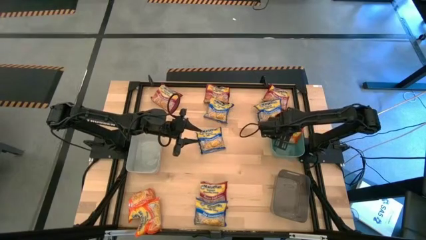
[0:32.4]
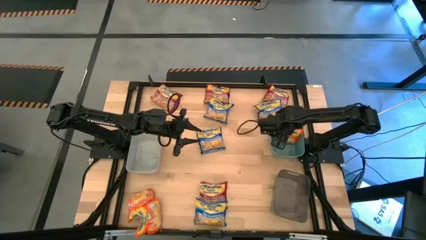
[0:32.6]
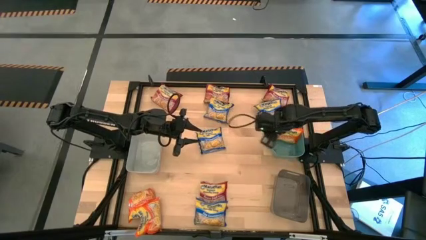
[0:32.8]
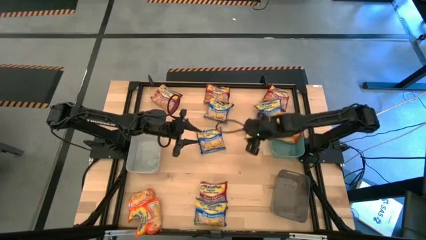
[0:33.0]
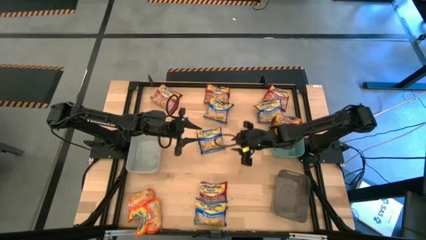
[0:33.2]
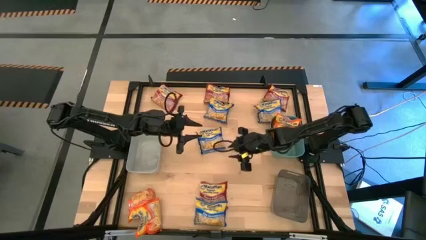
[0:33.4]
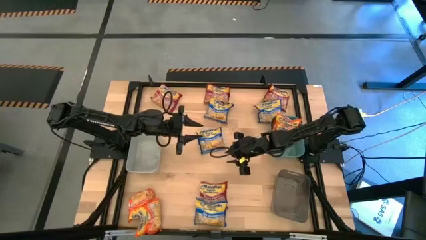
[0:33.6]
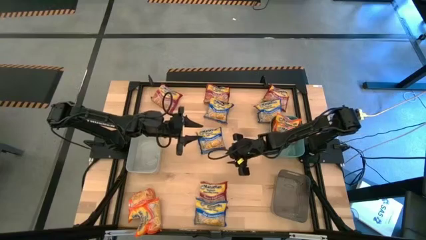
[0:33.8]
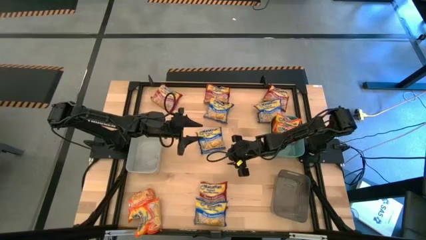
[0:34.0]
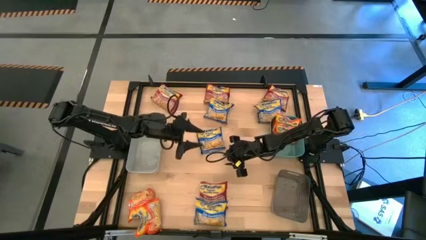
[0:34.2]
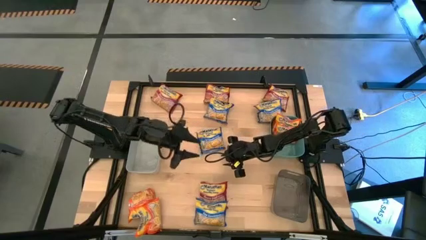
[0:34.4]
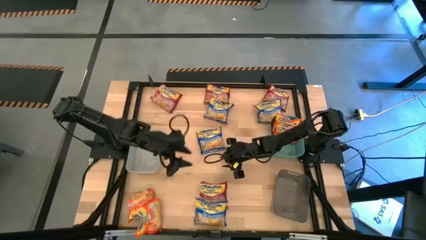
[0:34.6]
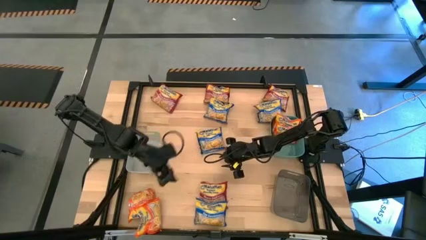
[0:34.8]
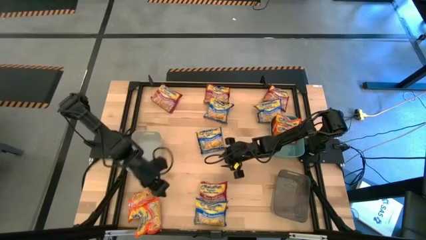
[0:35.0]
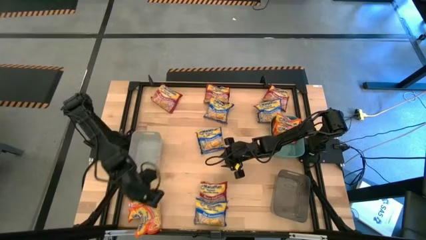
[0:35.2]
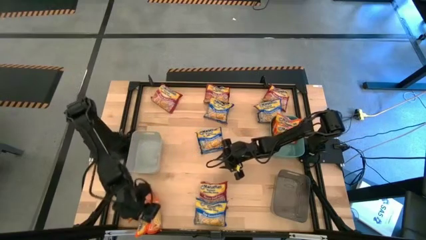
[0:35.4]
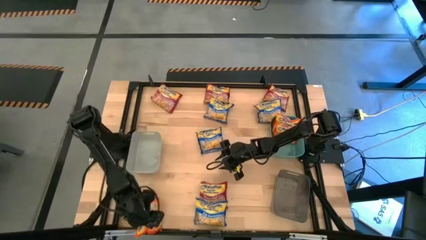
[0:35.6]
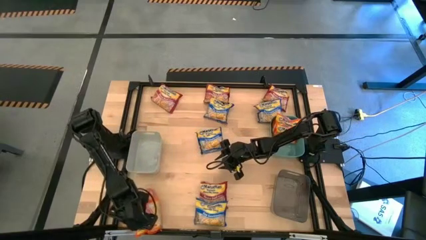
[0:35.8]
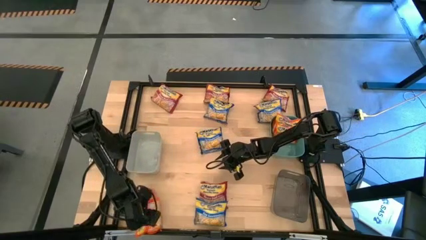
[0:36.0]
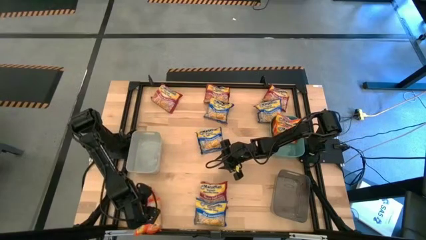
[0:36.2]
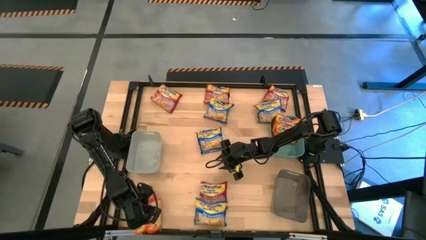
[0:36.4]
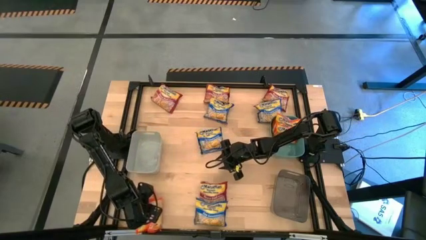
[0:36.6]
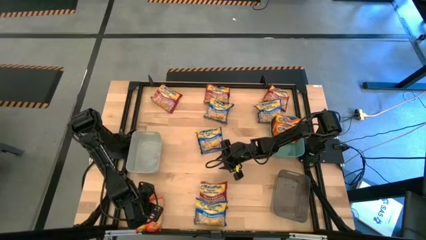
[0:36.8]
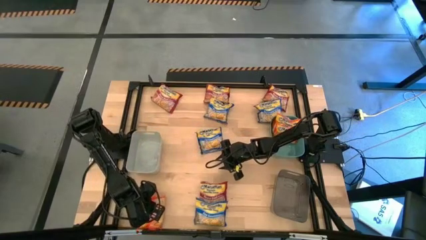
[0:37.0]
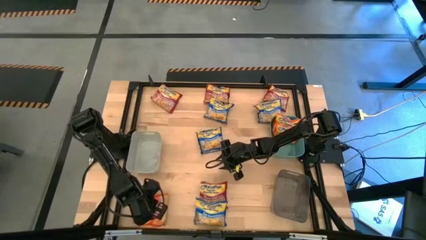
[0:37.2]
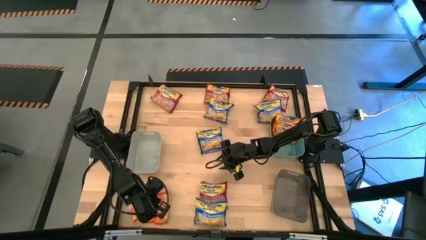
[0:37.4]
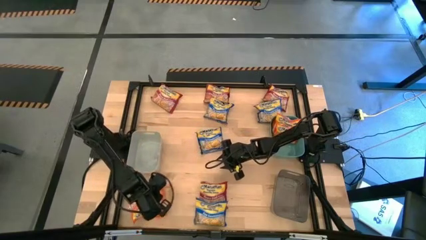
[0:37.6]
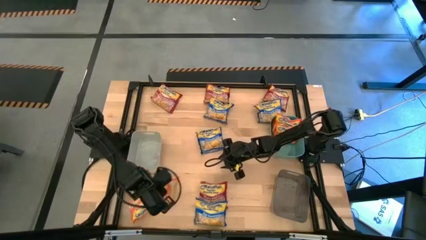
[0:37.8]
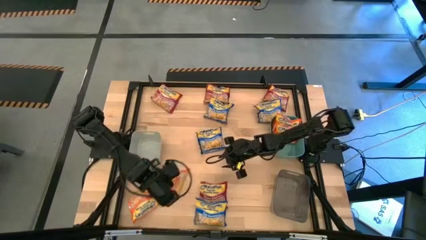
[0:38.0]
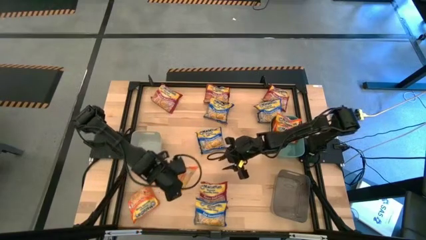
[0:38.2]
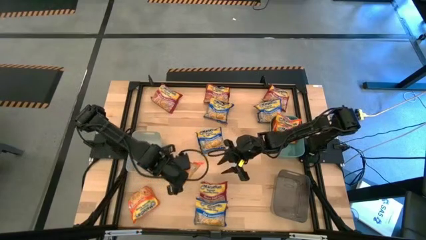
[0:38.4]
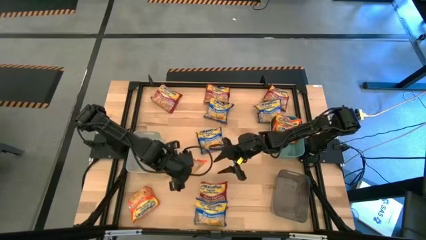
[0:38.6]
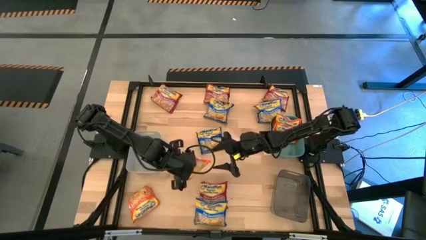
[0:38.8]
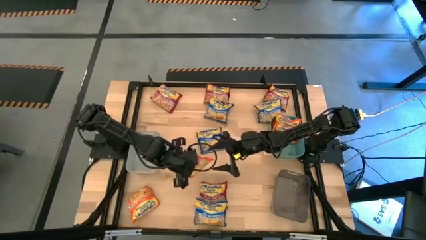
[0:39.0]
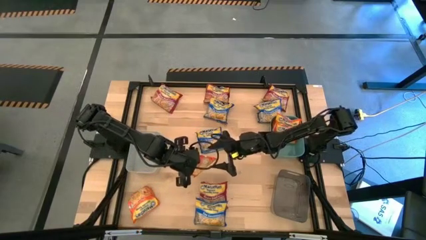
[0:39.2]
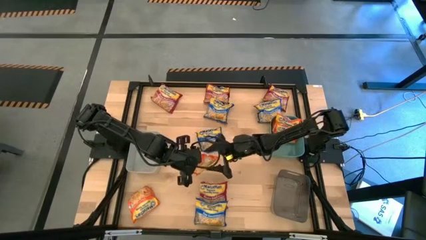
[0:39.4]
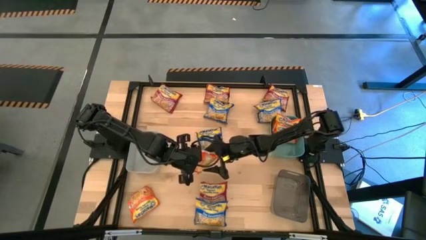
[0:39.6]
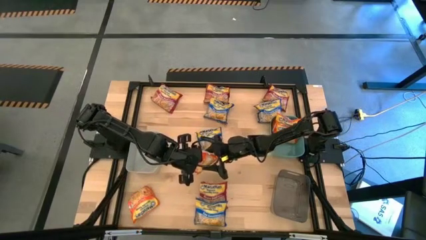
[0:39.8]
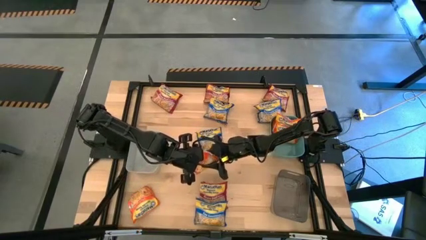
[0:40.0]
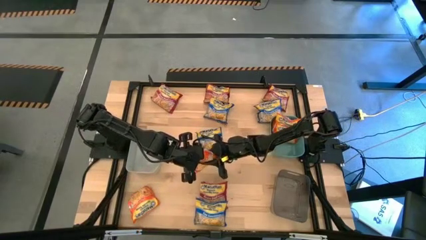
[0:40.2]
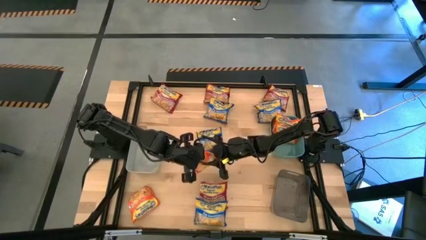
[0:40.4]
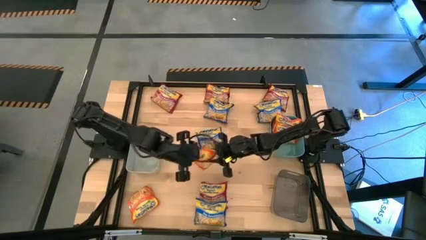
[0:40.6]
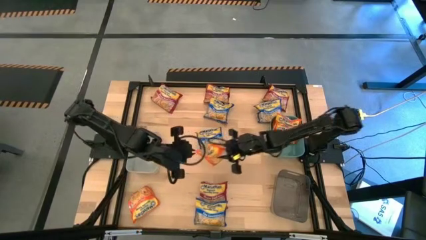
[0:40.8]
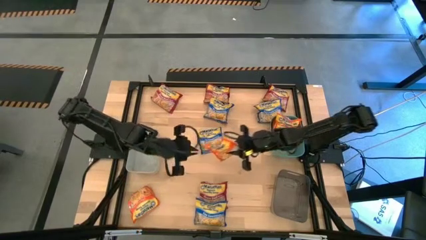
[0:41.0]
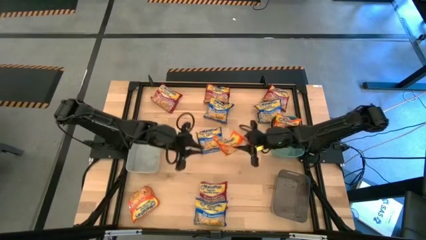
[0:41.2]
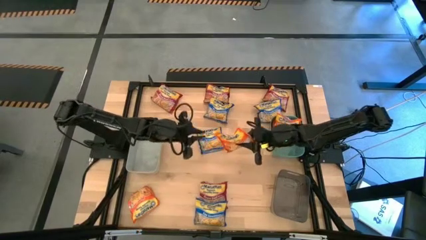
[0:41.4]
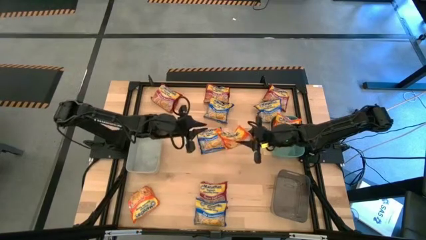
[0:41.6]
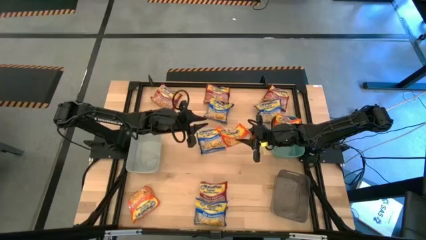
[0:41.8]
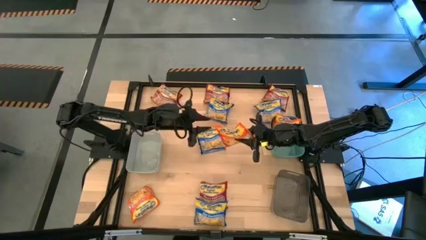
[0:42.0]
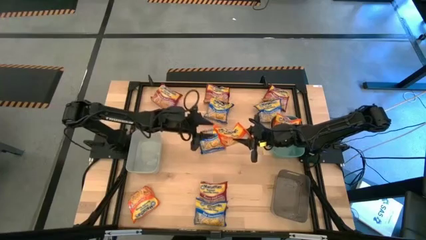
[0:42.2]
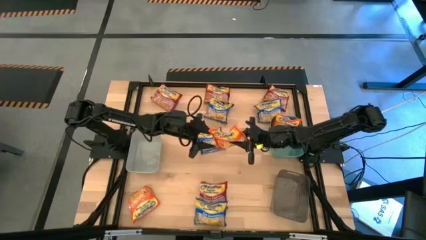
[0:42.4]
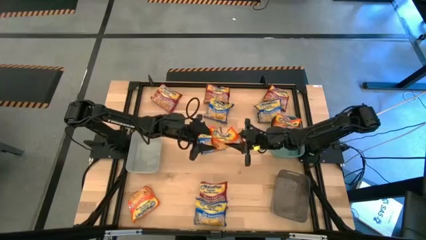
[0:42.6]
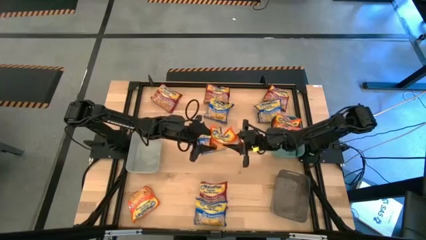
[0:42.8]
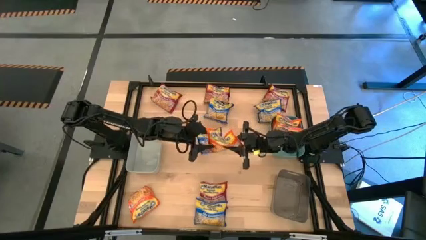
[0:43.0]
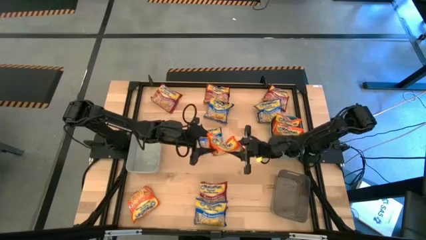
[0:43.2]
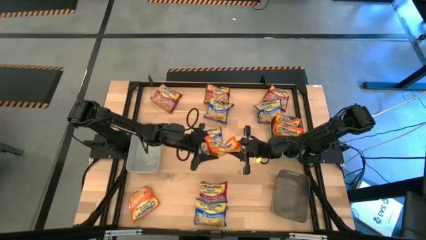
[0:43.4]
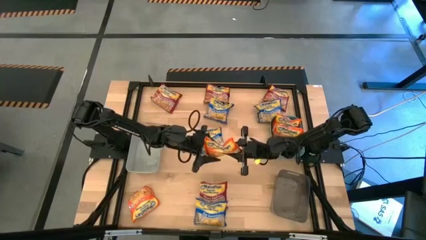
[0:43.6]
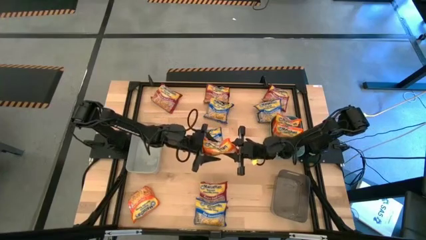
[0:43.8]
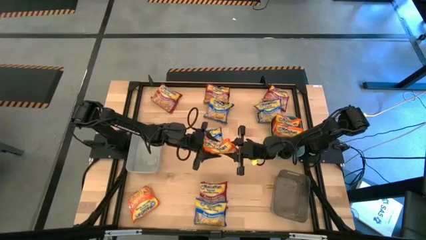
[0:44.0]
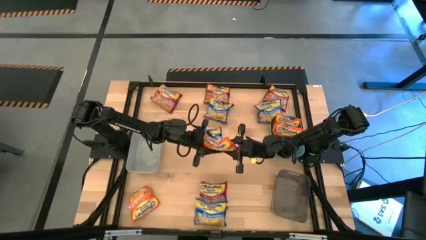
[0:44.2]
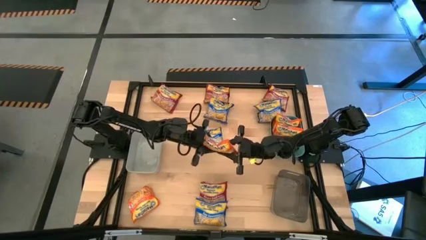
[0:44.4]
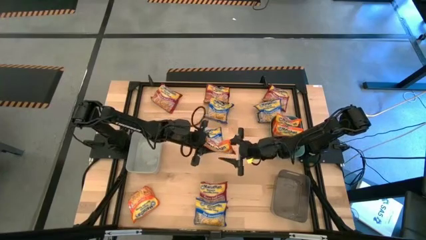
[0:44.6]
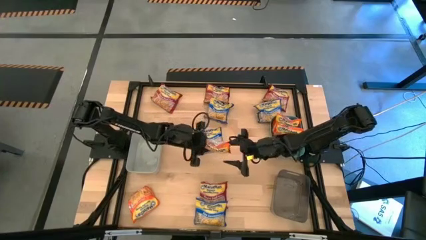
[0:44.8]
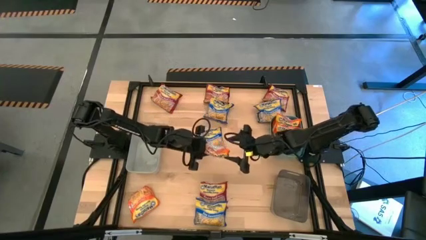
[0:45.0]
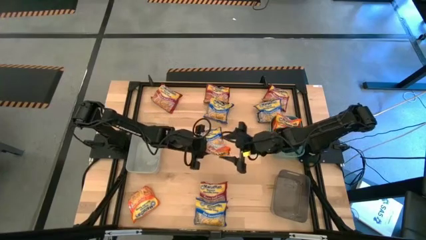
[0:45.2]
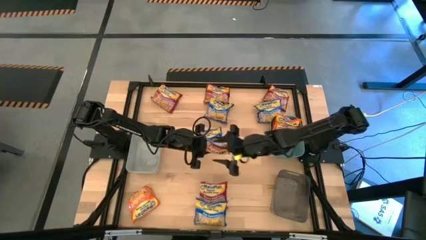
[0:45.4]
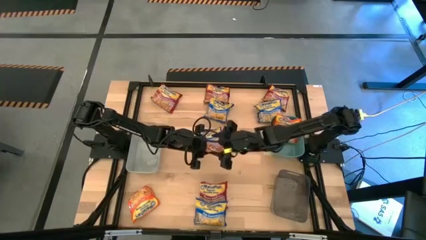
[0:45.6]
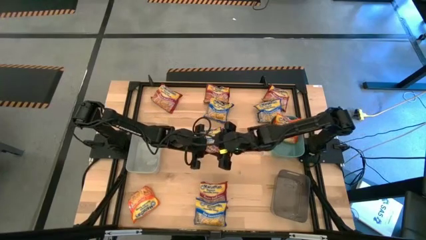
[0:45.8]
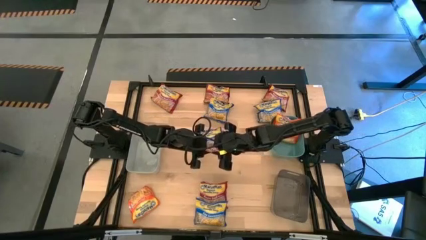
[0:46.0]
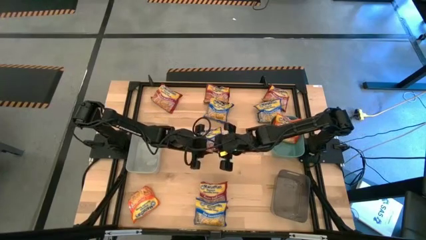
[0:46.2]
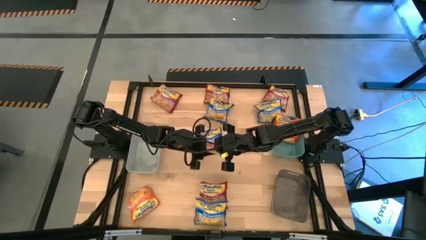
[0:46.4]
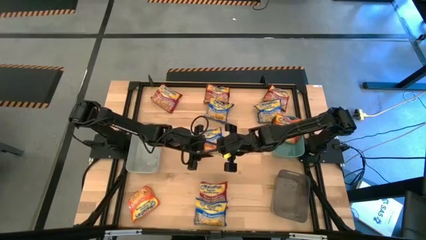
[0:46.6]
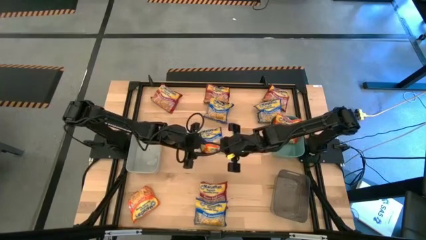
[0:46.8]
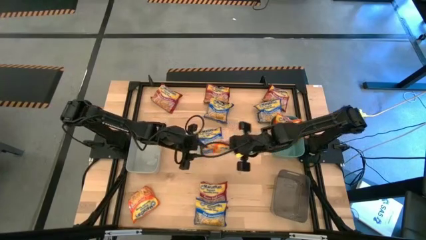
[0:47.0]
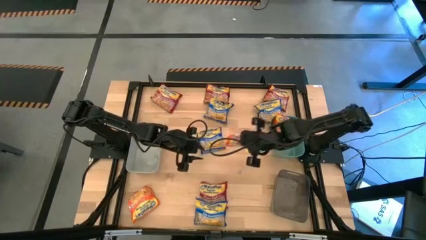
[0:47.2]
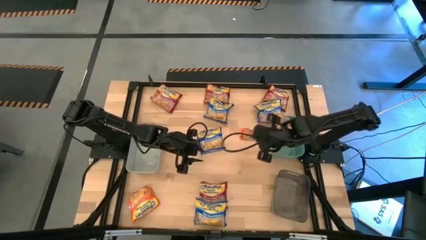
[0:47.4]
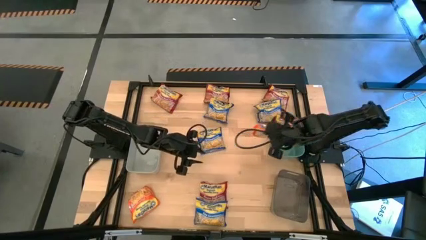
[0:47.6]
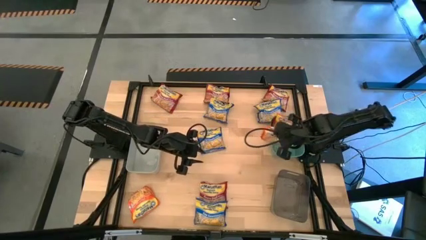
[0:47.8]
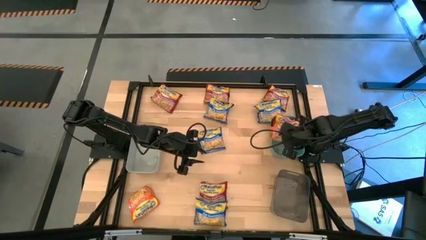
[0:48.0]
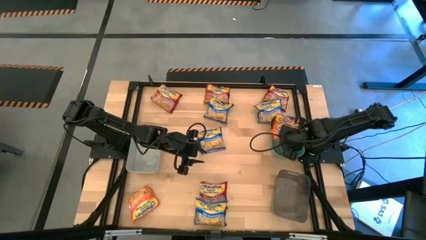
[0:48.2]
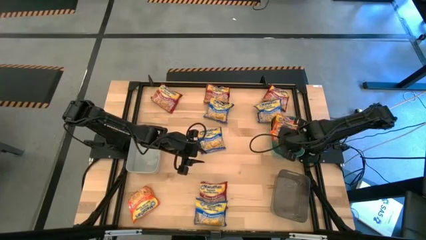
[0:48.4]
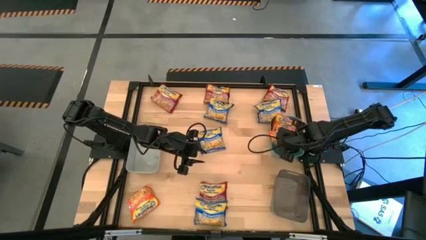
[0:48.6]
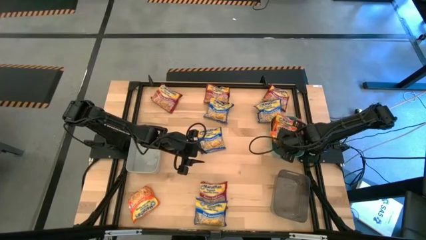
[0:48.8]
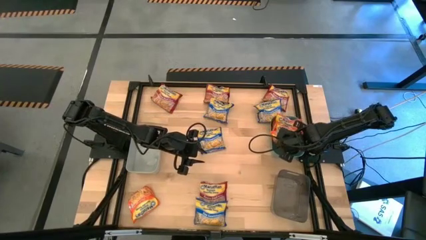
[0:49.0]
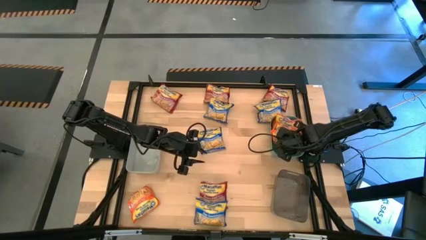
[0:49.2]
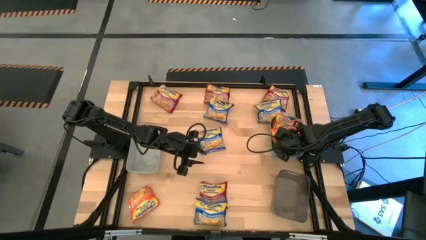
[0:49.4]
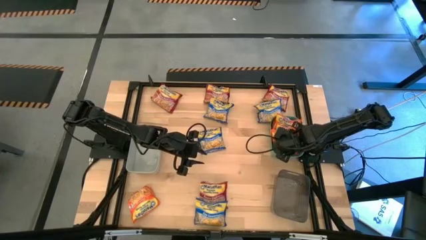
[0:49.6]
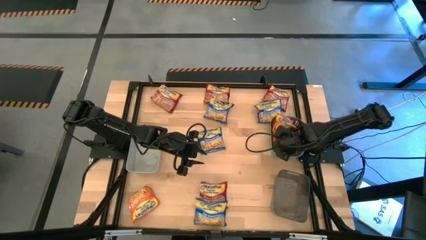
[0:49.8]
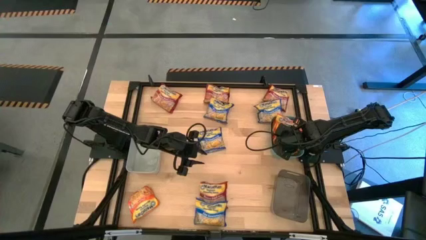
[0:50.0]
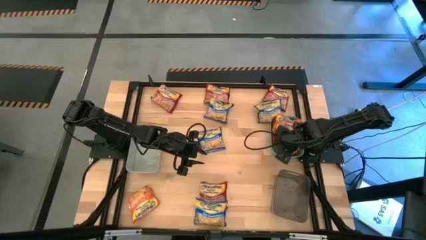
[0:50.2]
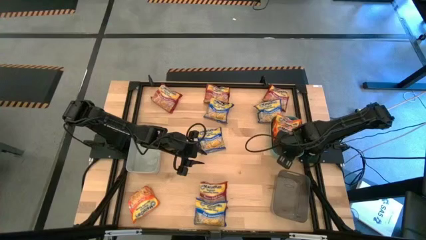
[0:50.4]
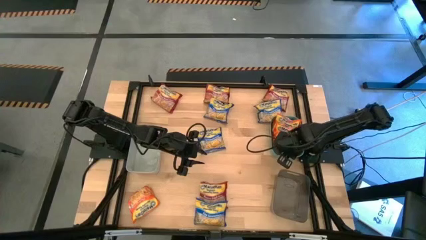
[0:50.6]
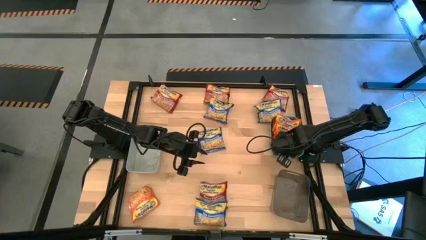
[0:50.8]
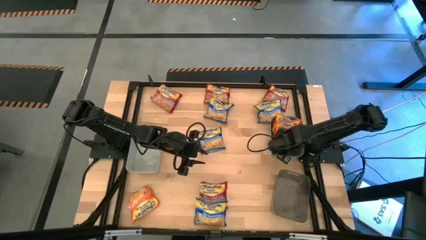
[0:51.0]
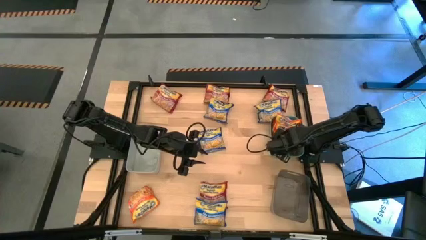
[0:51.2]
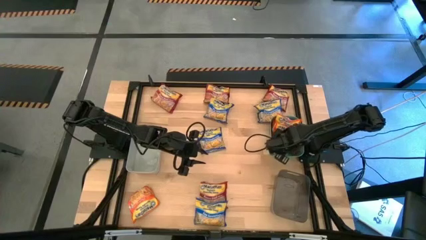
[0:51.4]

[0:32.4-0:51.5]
Task: Sort Maruchan noodles
Put the orange pack noodle into the green bin
